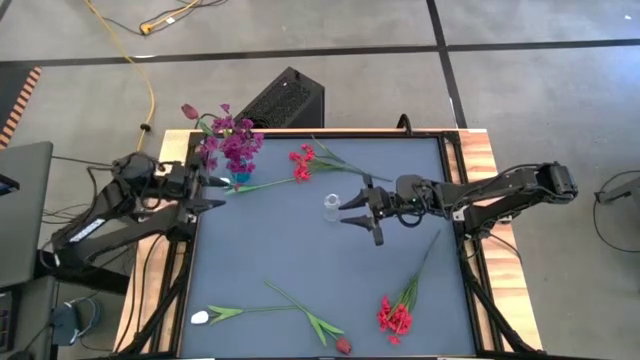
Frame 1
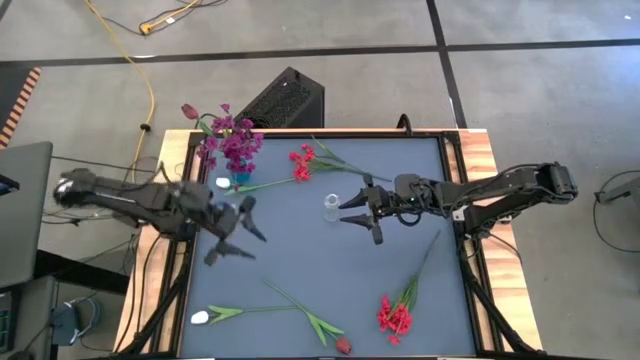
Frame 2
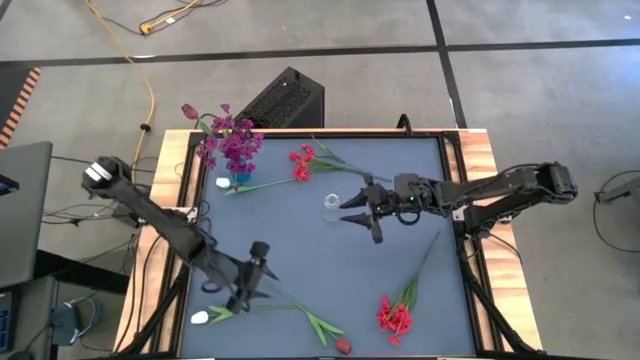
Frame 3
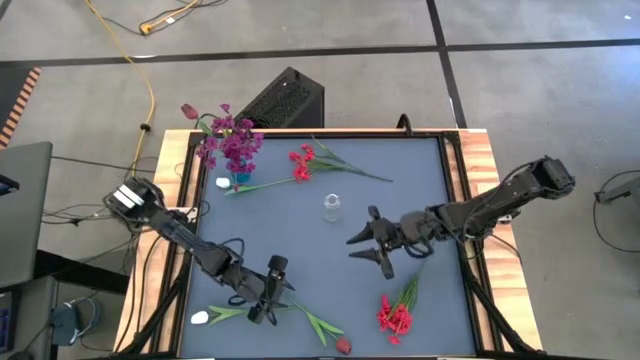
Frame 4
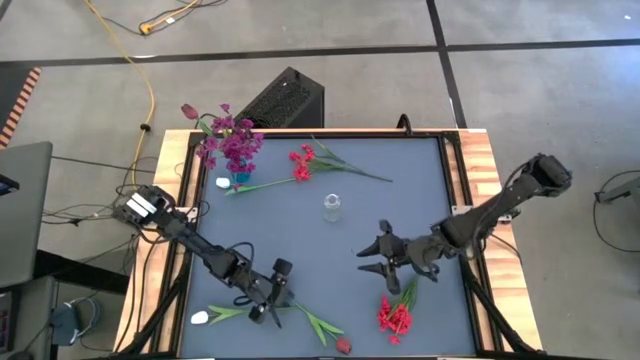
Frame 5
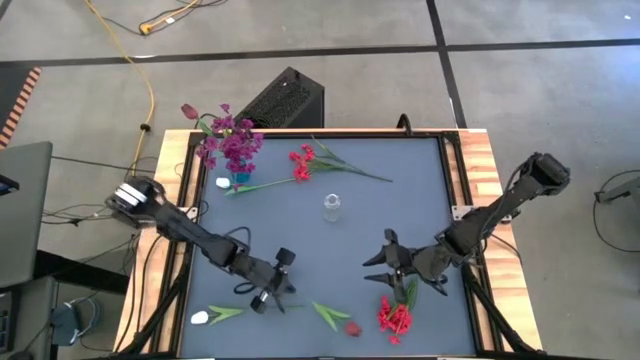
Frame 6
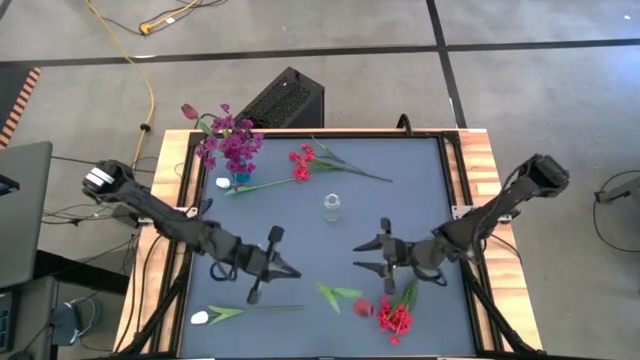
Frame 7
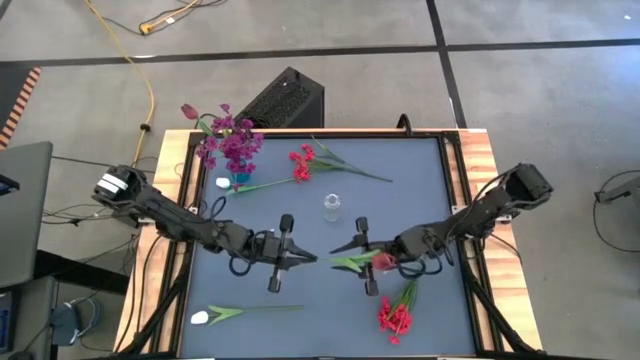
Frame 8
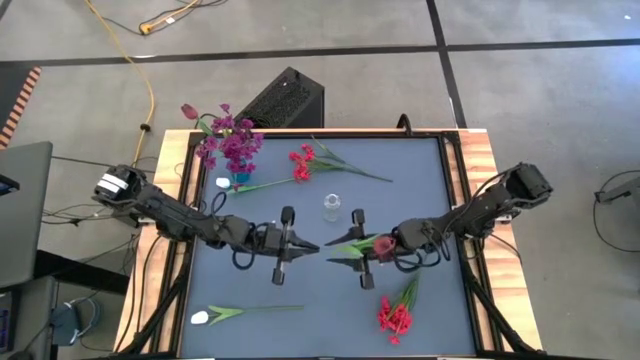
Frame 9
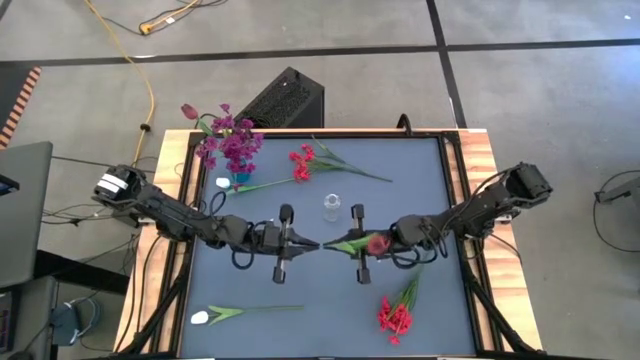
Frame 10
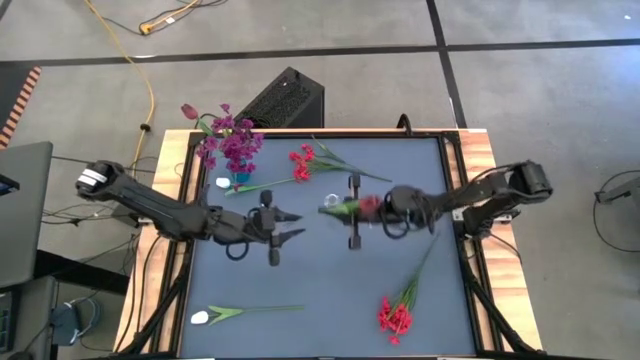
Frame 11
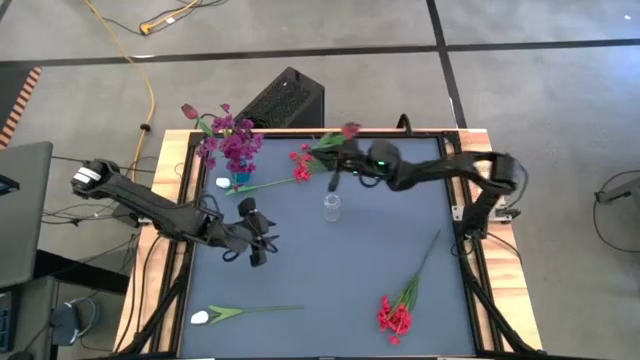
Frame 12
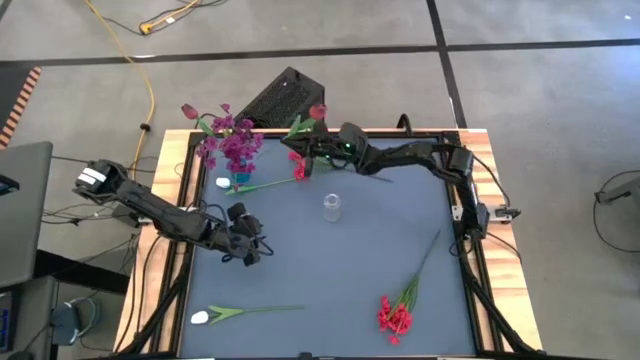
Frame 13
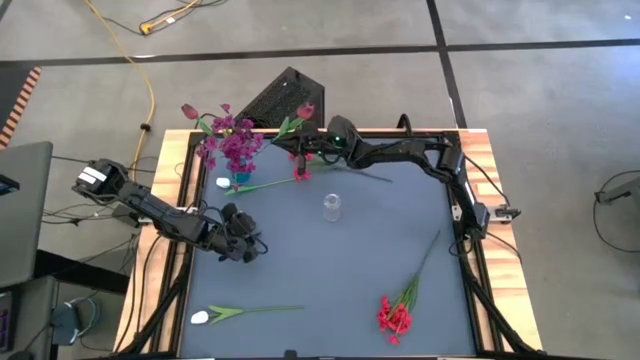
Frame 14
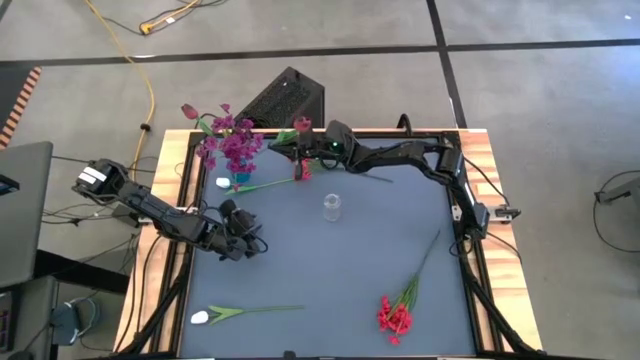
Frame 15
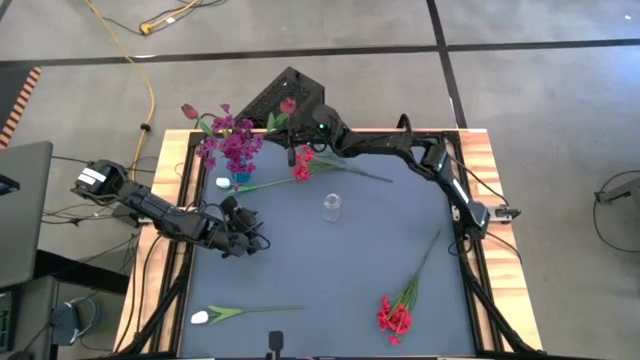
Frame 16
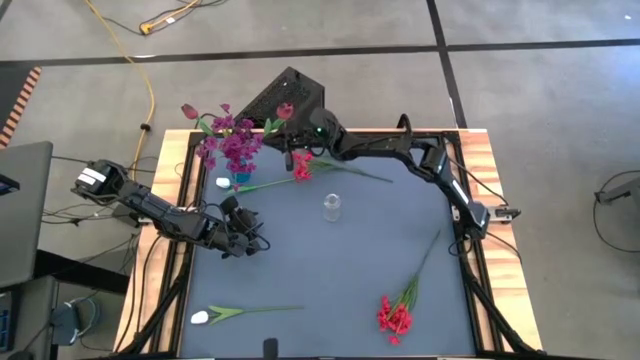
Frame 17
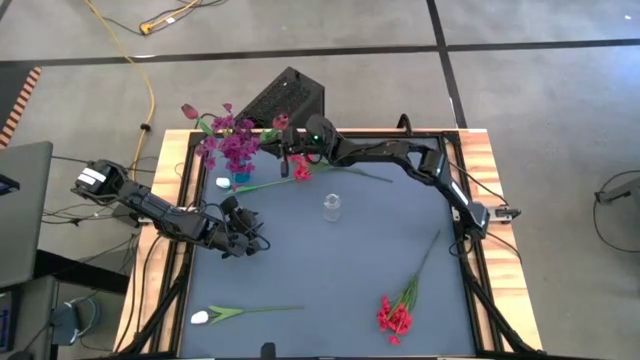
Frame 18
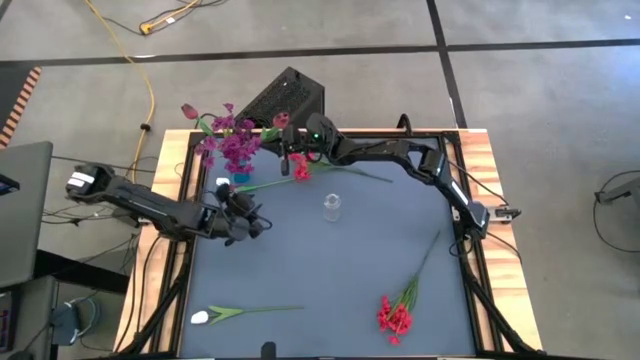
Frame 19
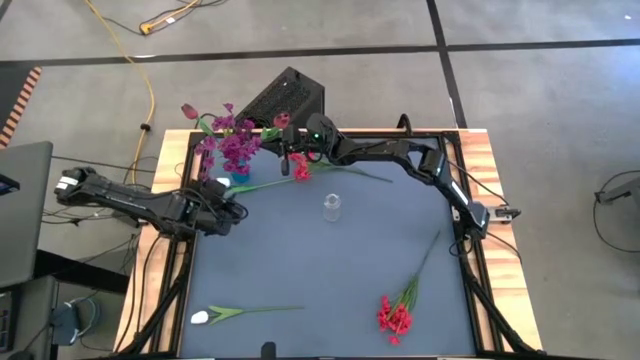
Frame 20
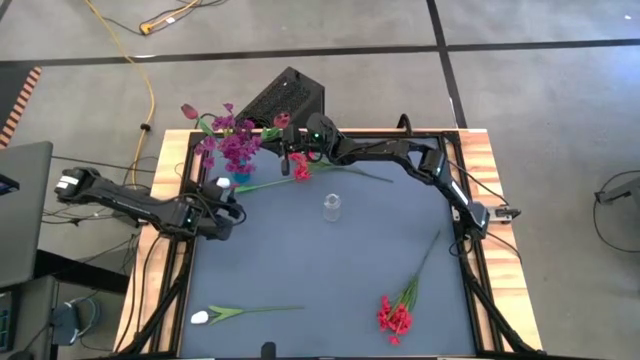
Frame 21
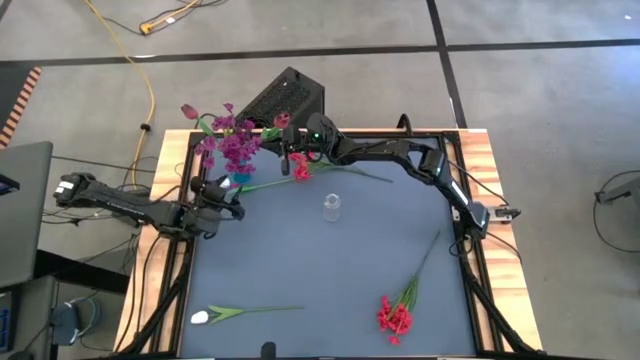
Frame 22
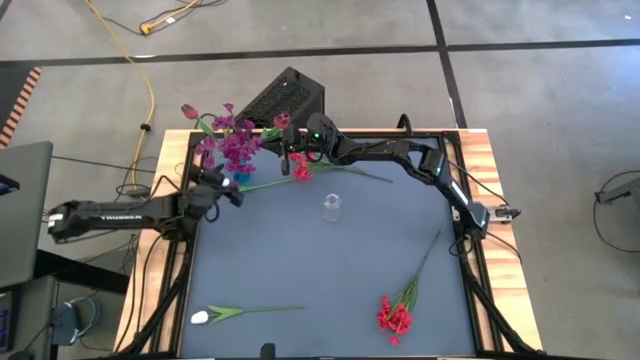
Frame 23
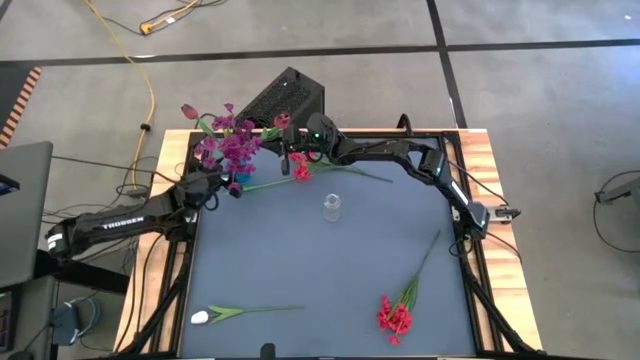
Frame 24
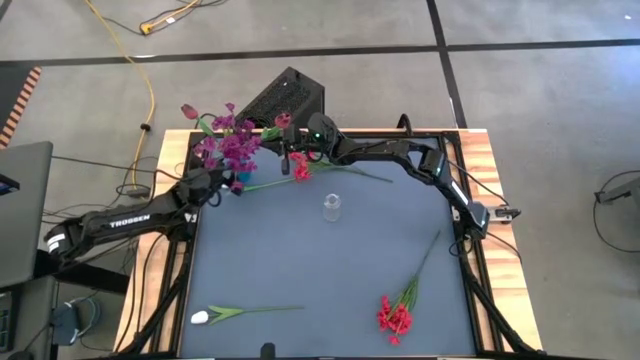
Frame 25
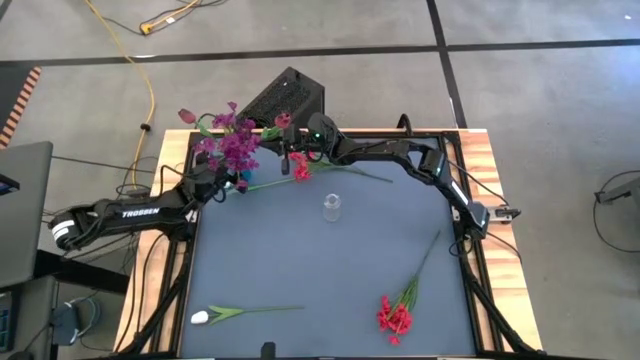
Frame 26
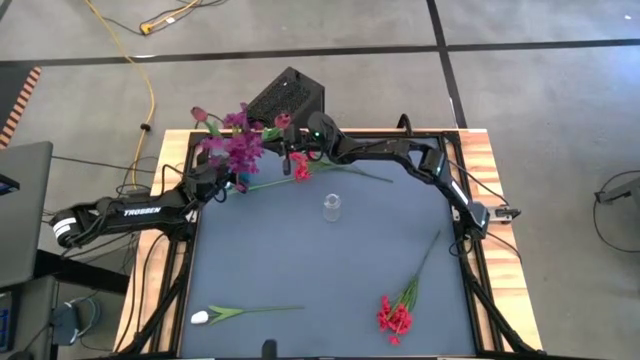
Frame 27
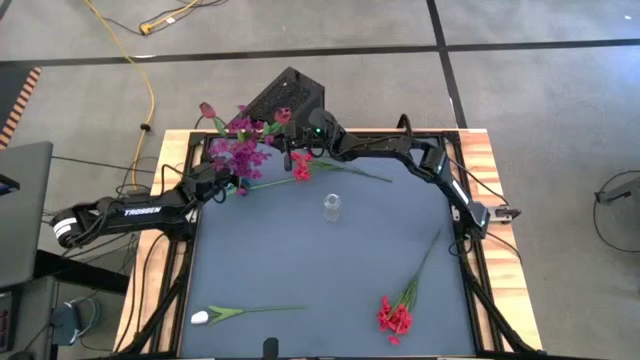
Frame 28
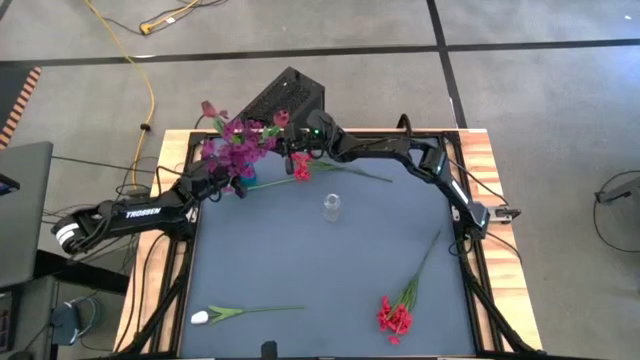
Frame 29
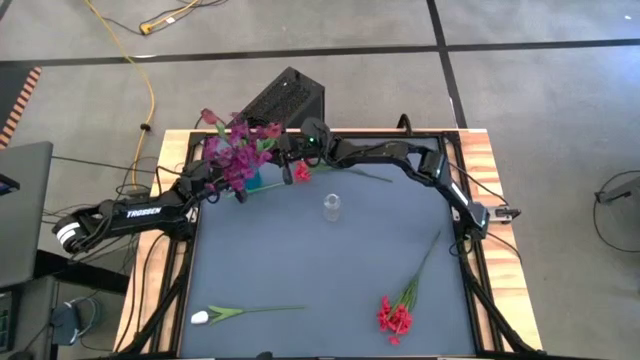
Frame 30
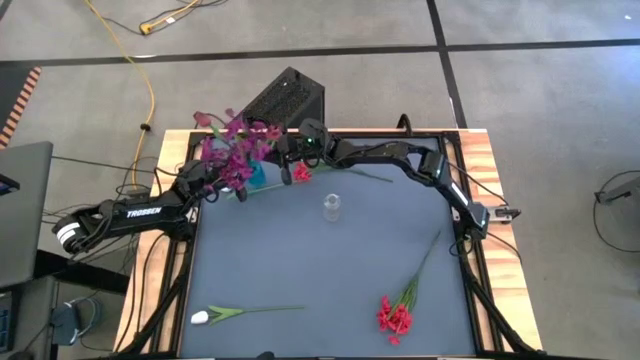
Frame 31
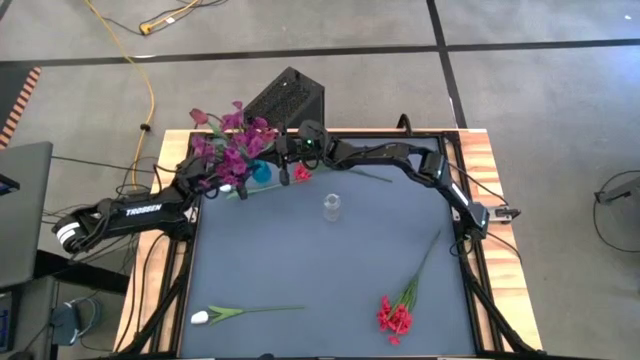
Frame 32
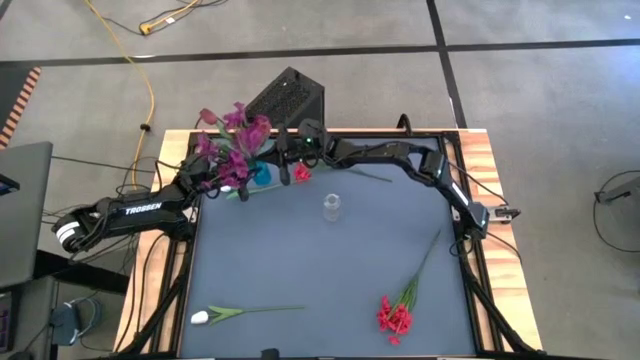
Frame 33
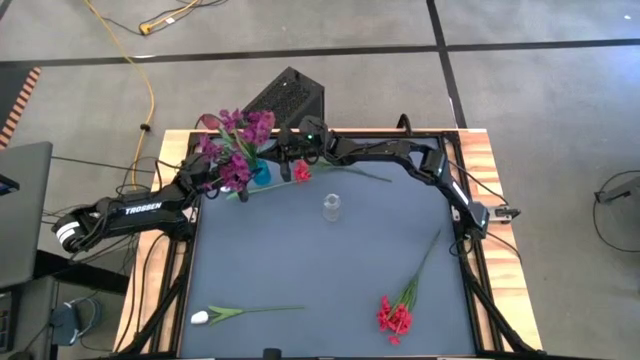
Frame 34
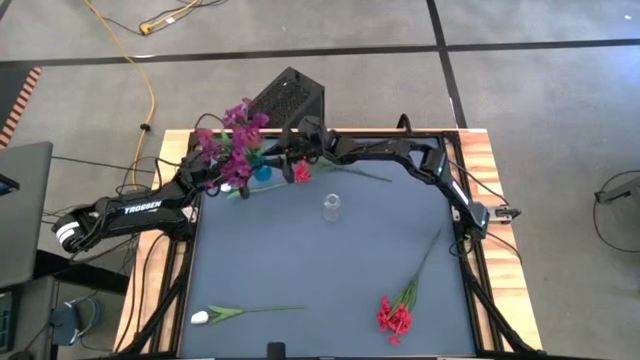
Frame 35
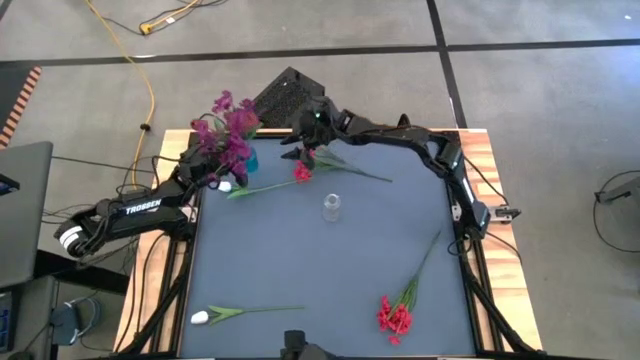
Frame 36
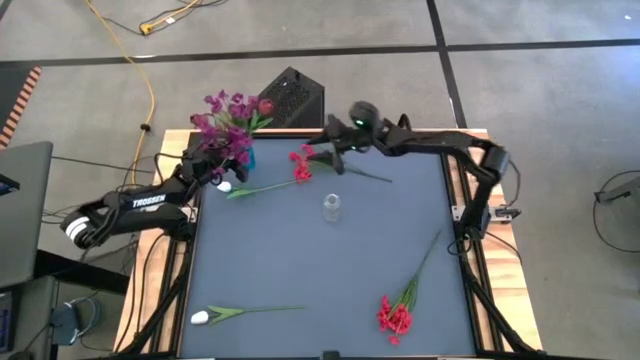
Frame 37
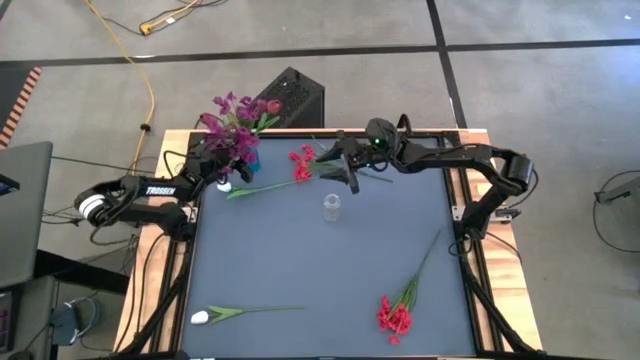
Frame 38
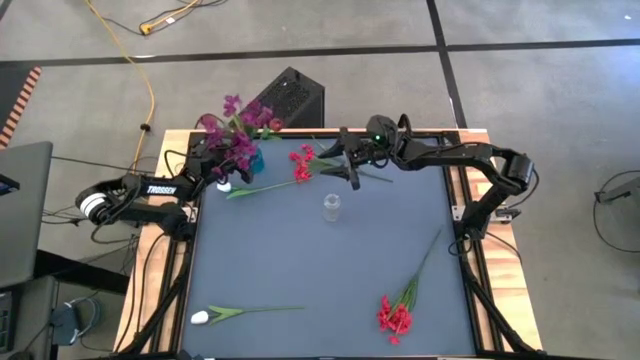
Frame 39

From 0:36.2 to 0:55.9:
Task: Sort flowers into vase by color
Put the dark red tulip into the blue vase

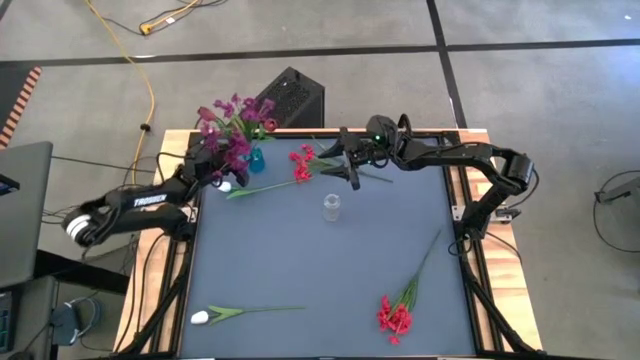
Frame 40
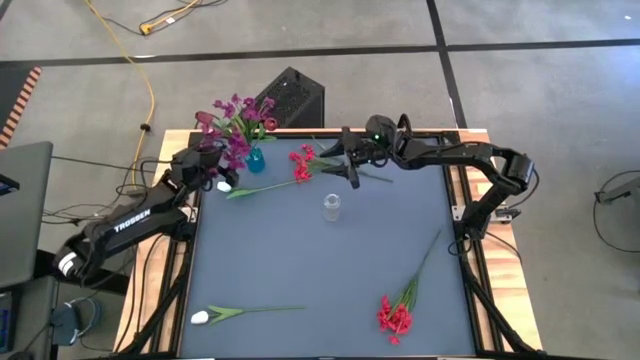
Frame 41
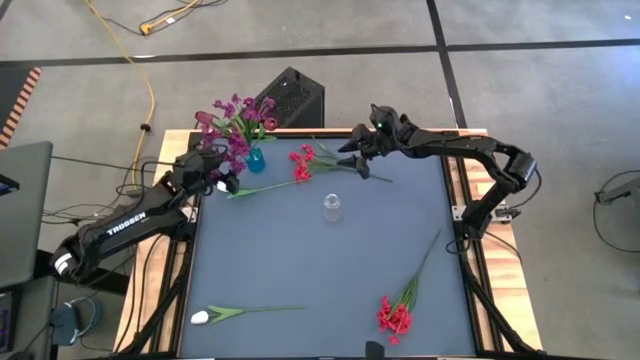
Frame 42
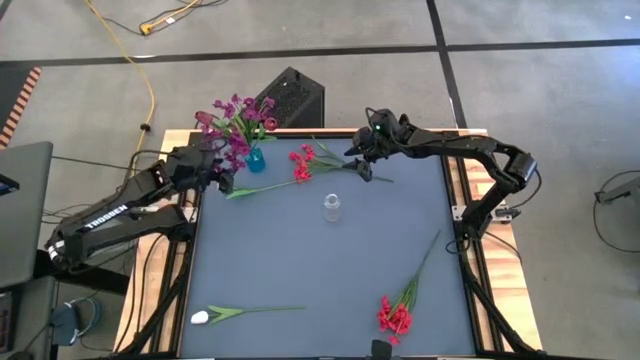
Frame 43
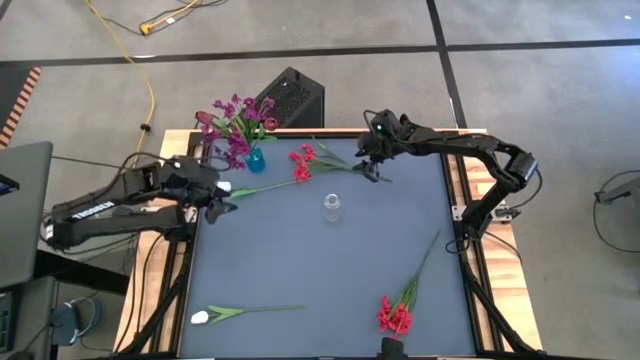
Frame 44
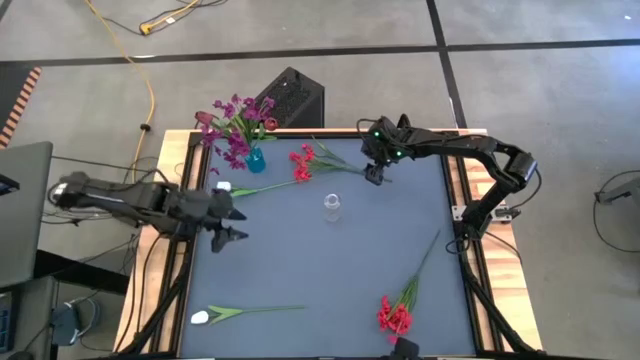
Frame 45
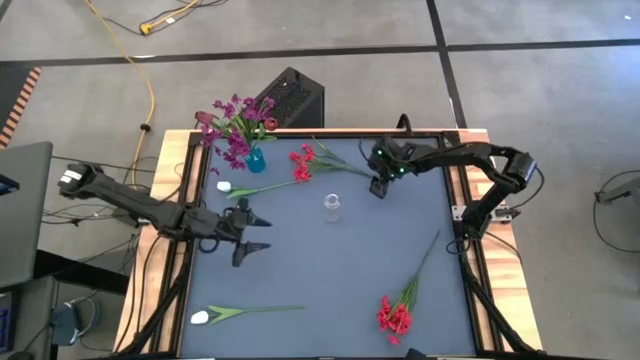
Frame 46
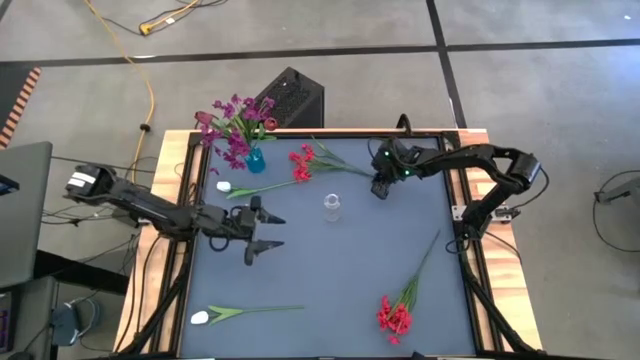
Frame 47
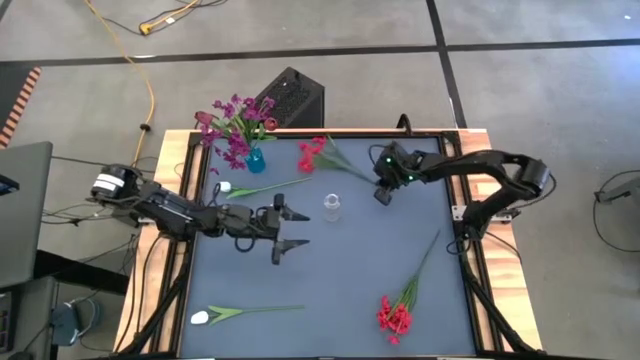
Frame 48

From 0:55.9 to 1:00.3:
Put the top red flowers into the transparent vase
